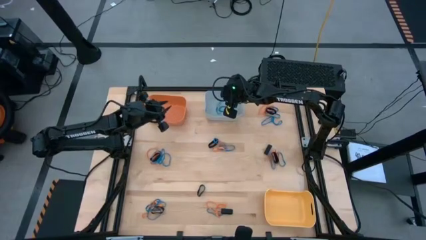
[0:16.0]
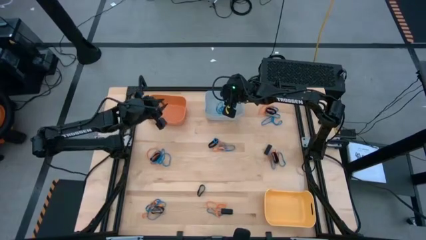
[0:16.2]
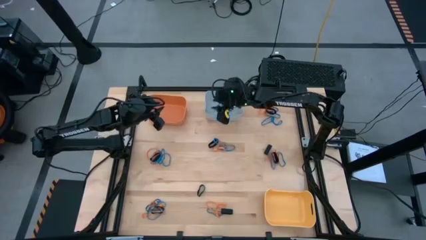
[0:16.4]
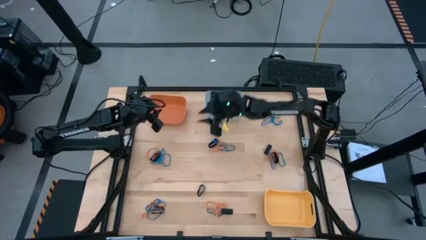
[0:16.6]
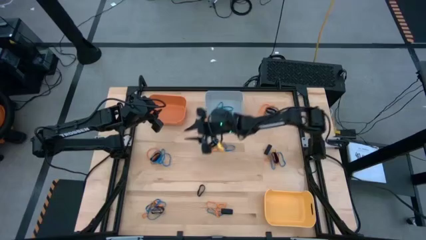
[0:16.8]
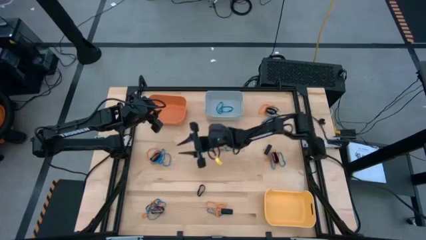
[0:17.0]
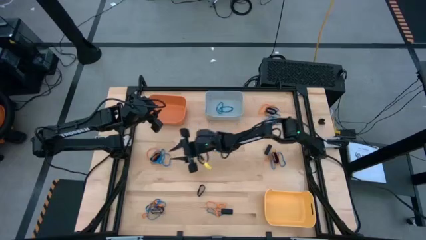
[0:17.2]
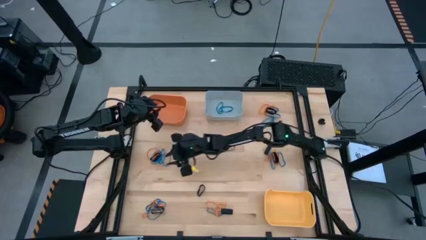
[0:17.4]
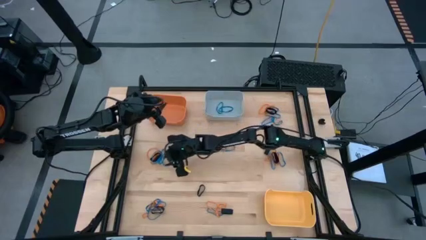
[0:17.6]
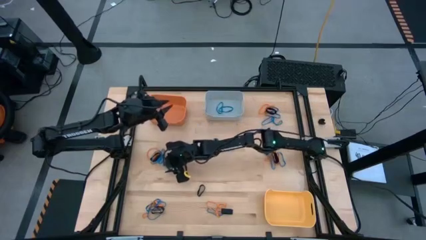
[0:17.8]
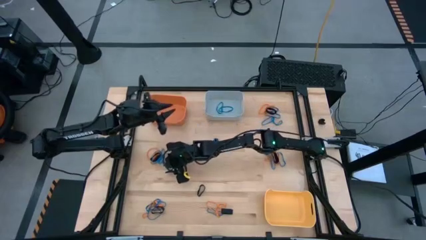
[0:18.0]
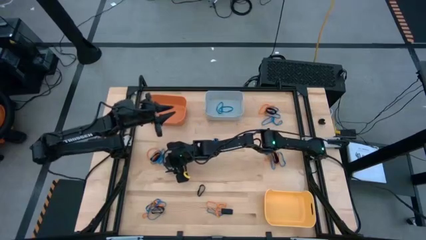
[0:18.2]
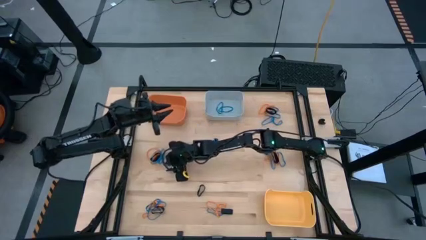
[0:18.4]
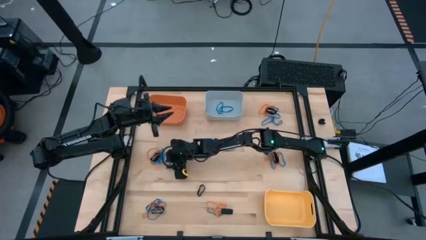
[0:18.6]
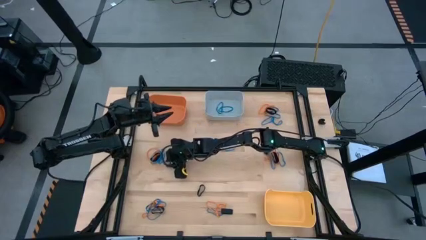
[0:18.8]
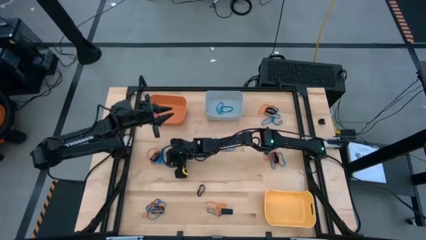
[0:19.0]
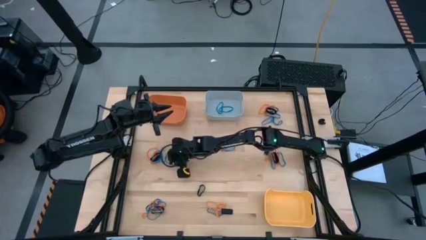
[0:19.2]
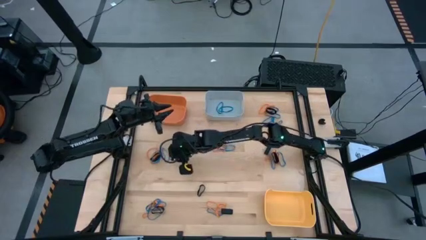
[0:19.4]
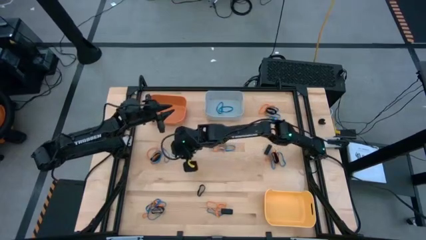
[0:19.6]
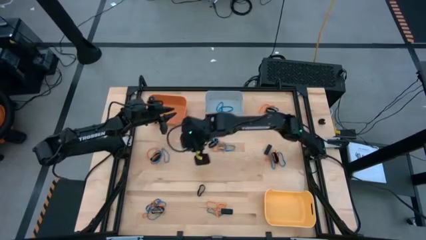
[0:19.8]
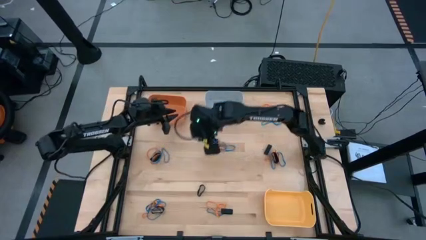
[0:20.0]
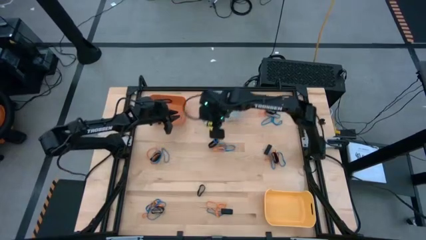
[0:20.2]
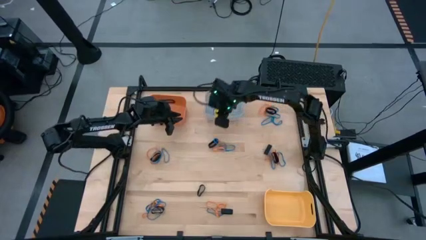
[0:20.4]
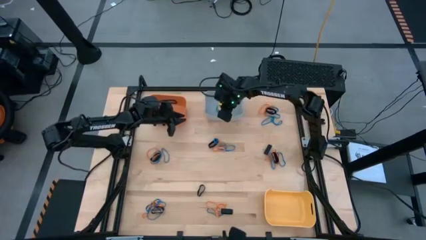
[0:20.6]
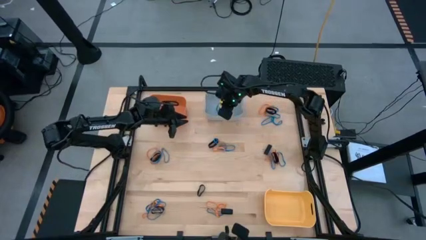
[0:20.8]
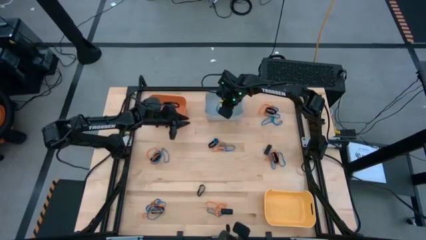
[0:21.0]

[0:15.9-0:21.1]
Task: Sort rubber bands into baskets
Put the blue rubberband into the gray bin

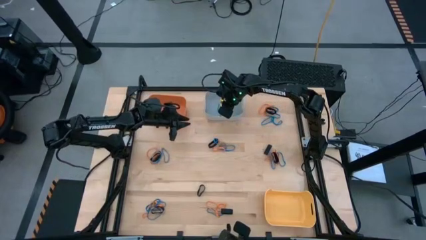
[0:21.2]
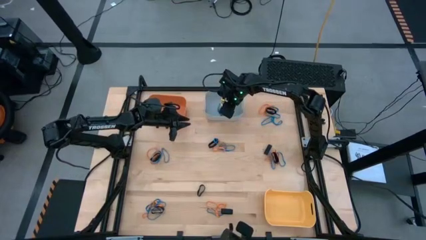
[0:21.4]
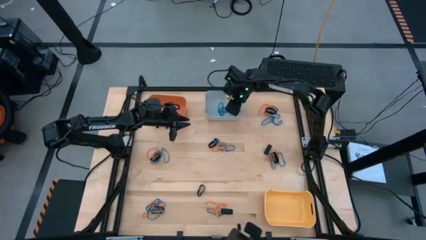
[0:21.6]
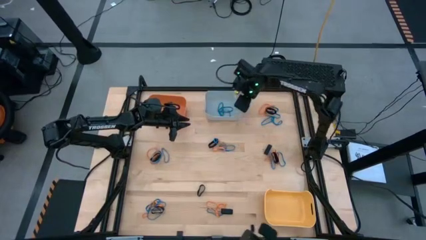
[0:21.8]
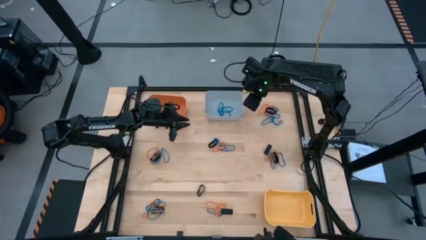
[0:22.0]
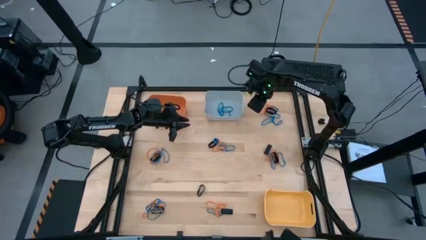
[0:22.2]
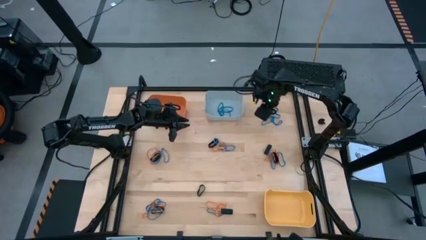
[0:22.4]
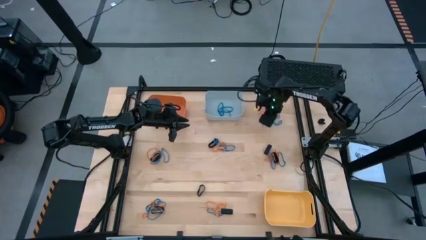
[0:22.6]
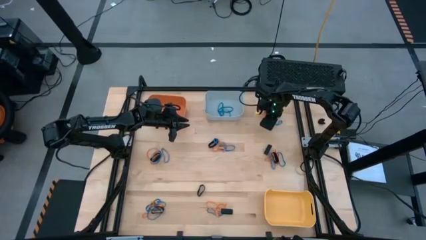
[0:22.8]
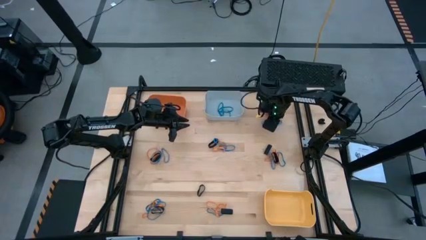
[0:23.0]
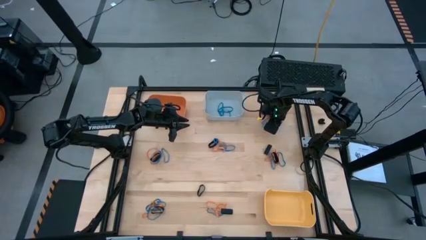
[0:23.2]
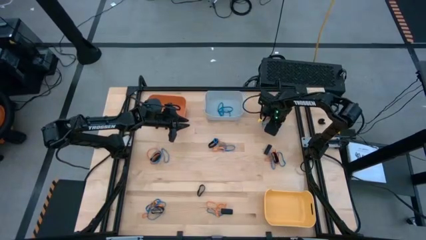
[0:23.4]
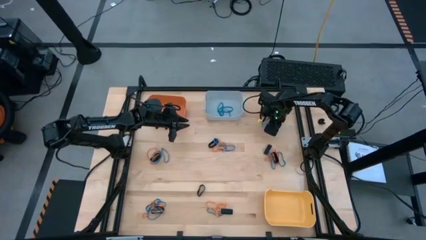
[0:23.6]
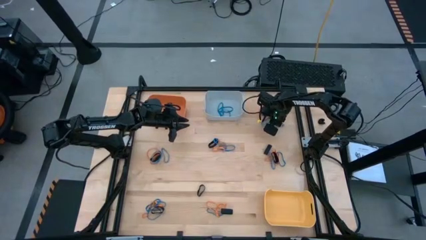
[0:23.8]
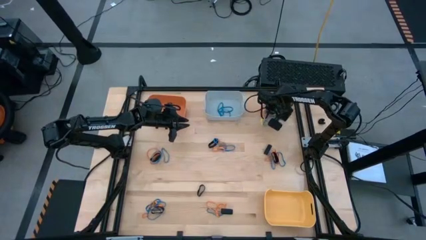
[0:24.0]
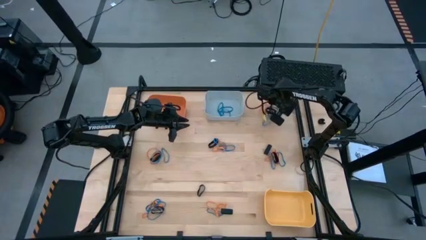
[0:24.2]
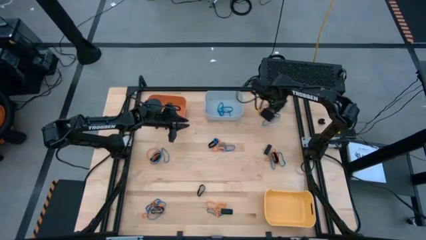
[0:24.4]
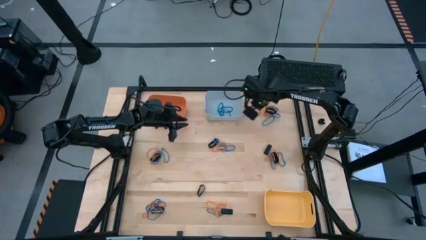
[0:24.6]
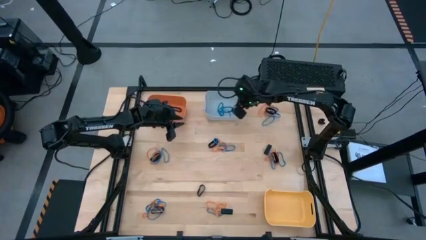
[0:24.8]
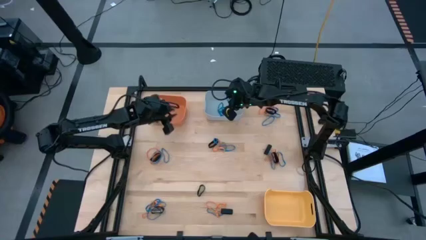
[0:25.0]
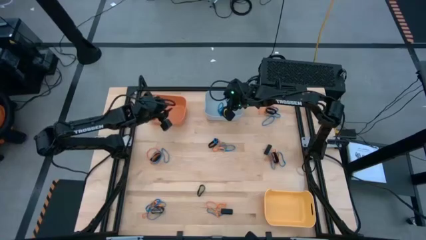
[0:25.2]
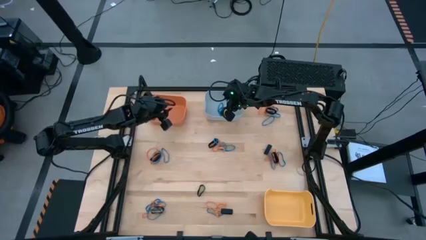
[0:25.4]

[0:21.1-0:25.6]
Put the blue rubberband into the gray bin

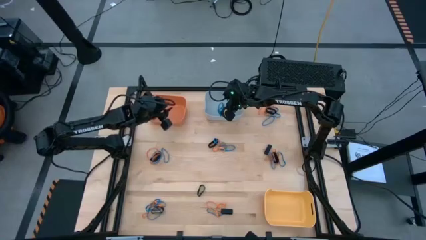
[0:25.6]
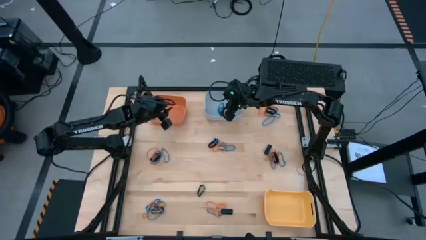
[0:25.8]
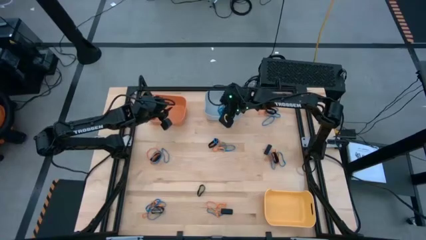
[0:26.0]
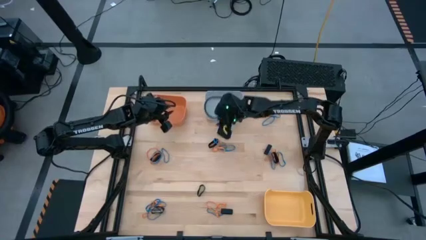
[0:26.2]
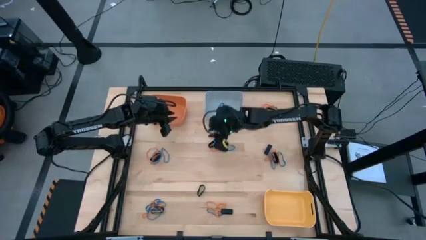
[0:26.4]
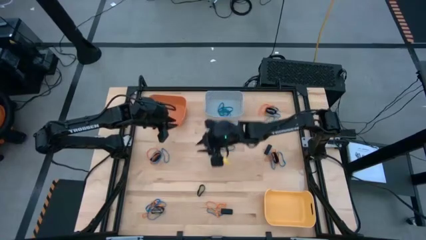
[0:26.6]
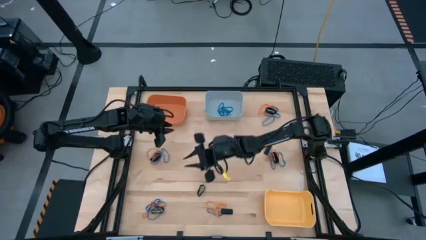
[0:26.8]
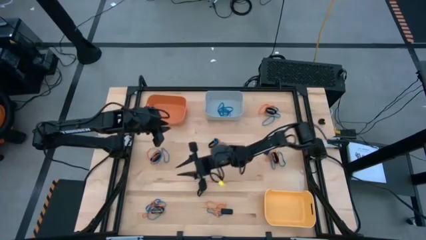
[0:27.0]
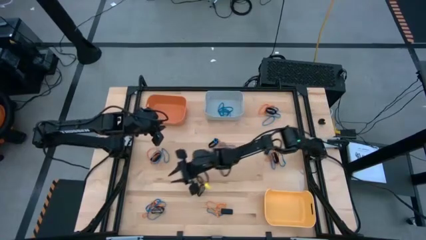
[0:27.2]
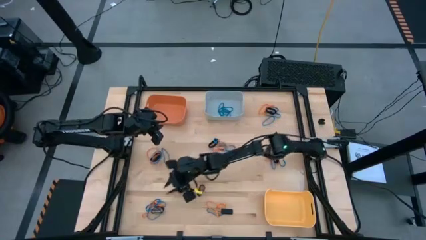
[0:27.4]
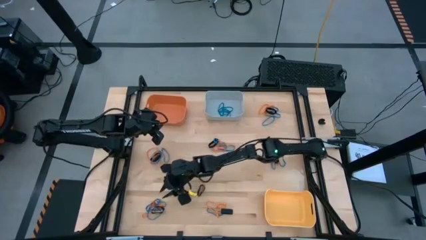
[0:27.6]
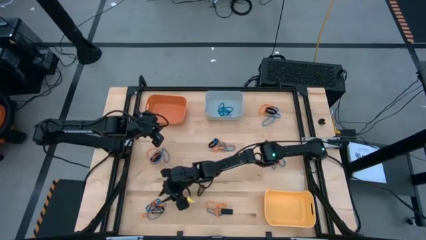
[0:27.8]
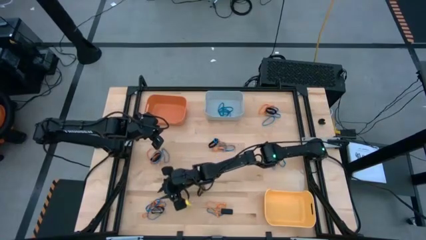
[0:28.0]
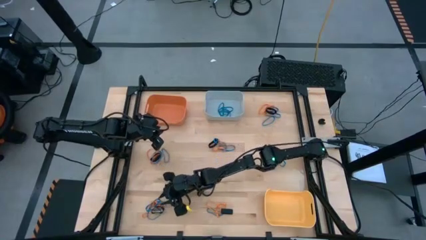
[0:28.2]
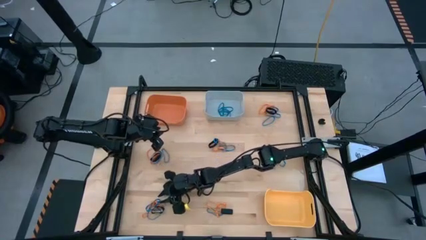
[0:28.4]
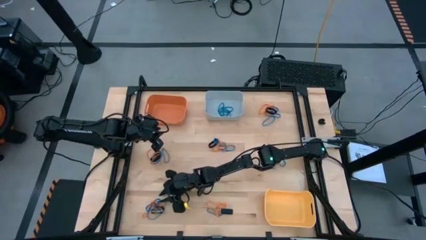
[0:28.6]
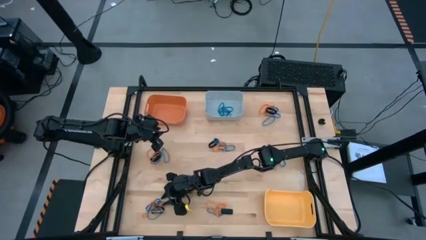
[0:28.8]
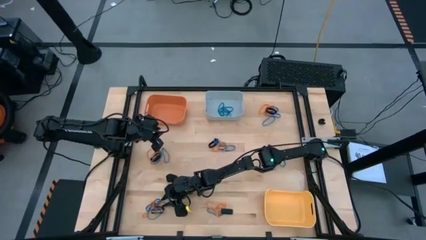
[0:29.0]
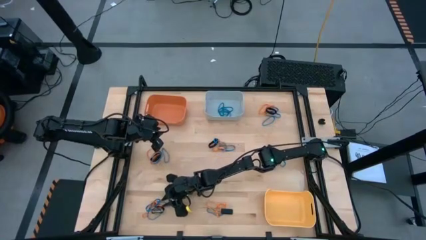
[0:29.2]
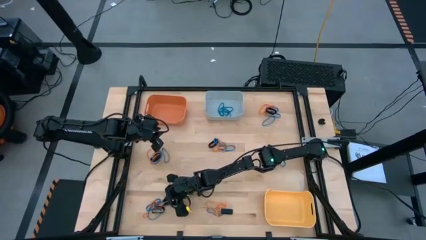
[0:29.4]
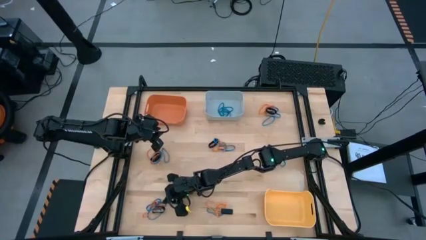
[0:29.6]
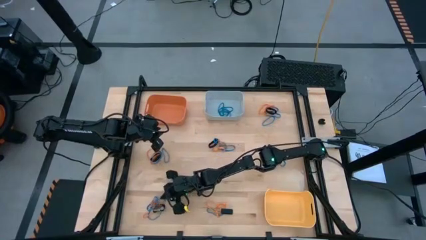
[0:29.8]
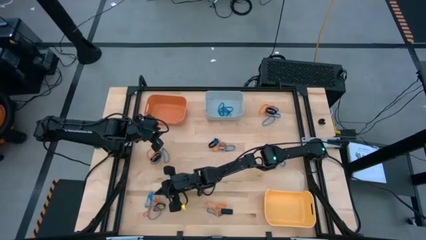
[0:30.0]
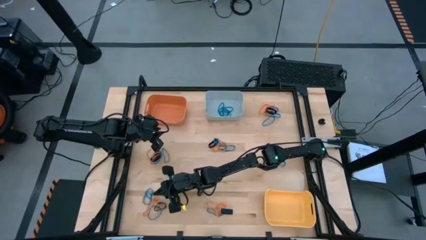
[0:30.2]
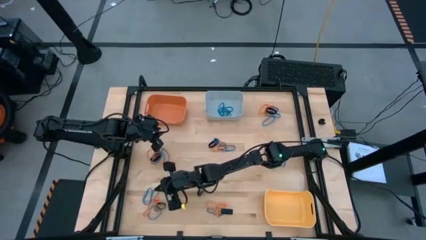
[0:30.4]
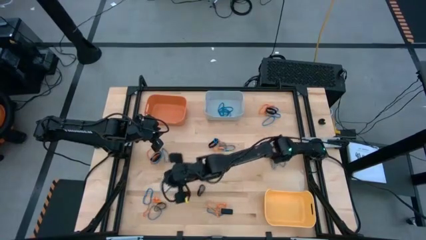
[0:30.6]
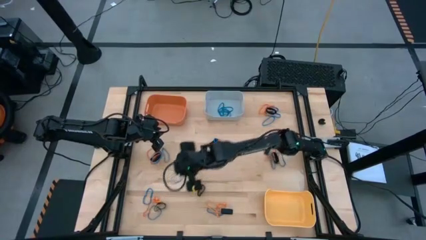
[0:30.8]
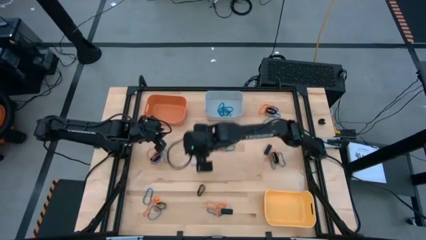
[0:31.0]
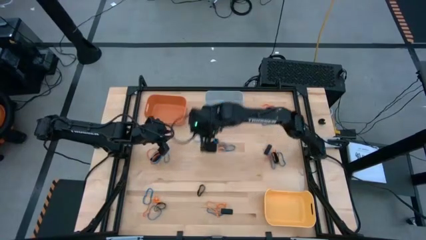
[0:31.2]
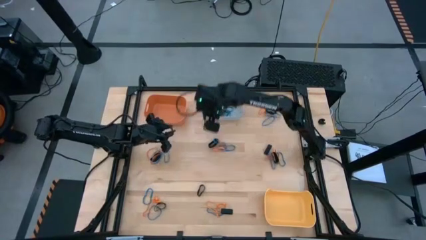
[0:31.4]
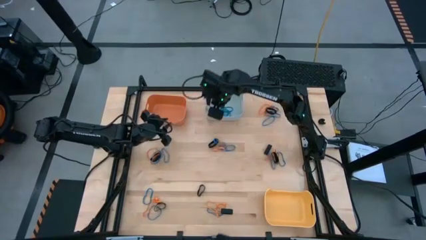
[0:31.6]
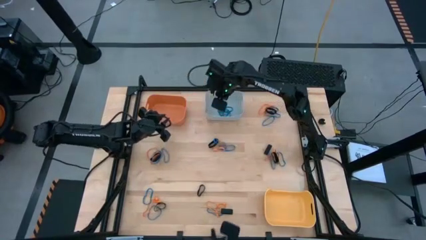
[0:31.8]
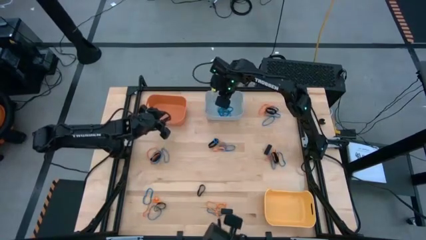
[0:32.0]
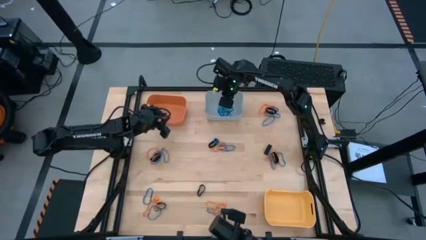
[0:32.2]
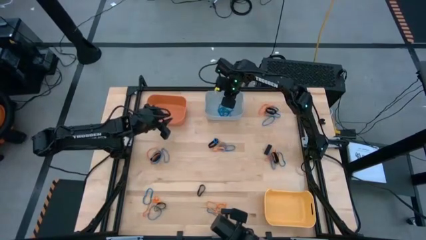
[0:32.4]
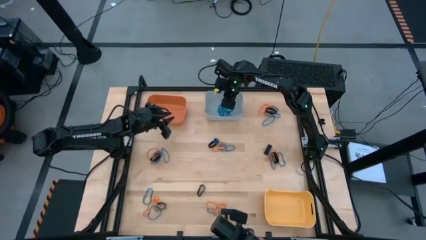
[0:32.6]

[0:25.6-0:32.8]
Put the blue rubberband into the gray bin
